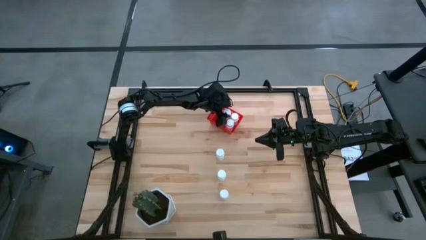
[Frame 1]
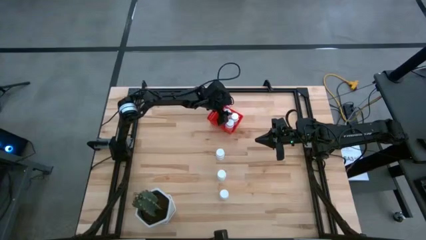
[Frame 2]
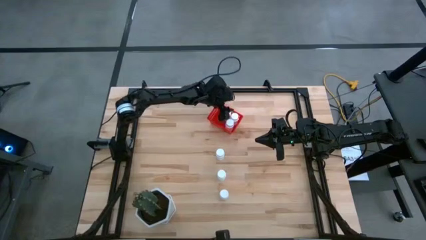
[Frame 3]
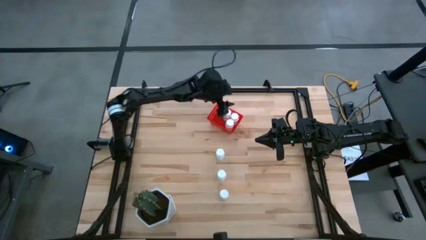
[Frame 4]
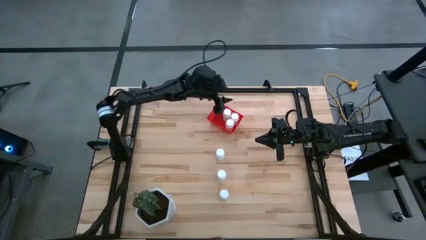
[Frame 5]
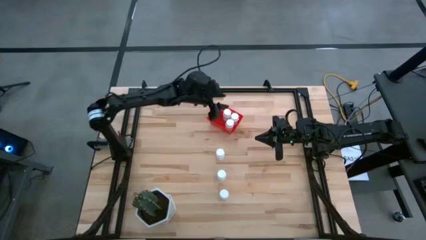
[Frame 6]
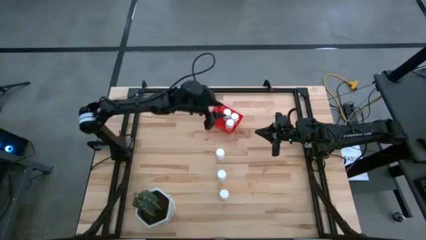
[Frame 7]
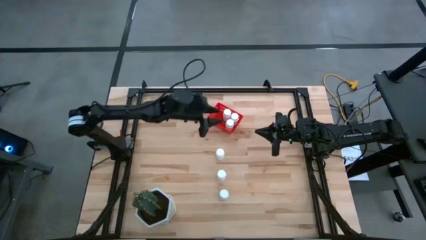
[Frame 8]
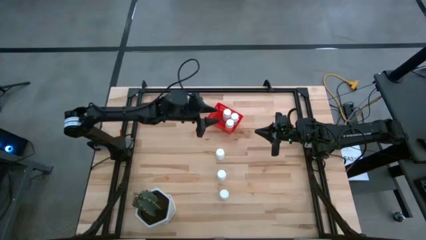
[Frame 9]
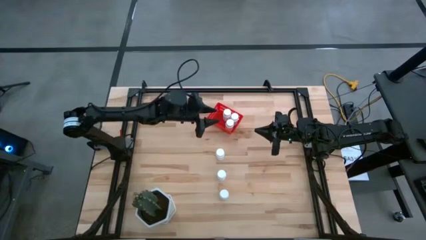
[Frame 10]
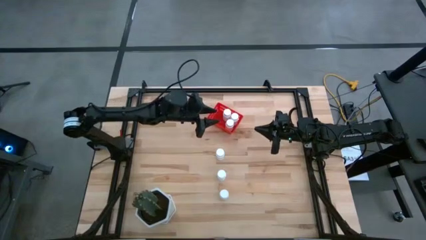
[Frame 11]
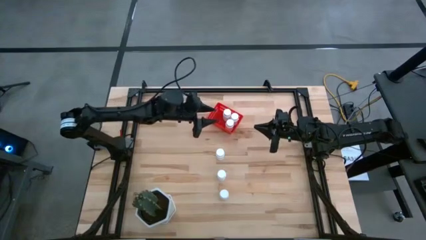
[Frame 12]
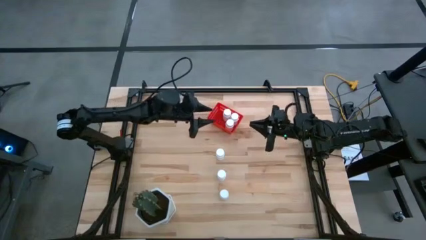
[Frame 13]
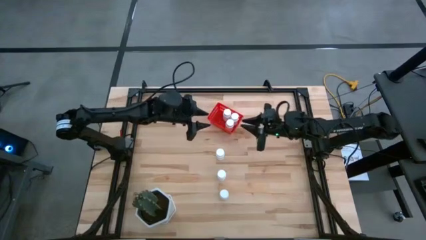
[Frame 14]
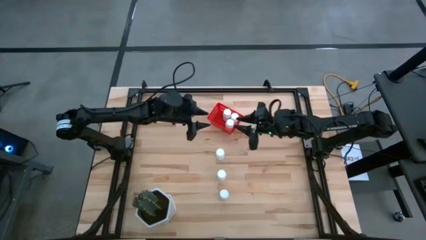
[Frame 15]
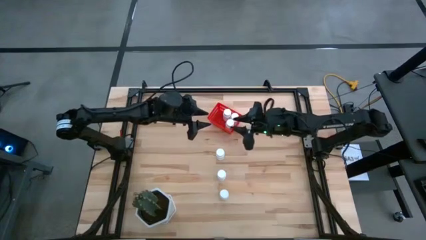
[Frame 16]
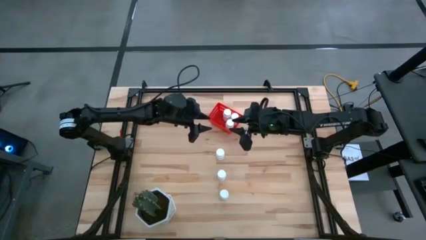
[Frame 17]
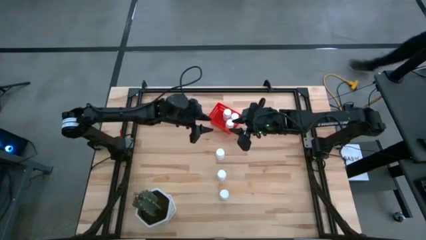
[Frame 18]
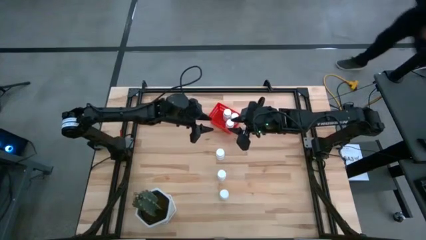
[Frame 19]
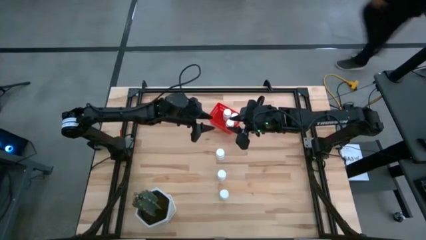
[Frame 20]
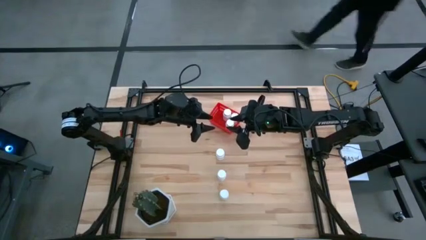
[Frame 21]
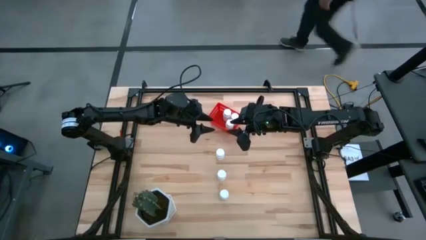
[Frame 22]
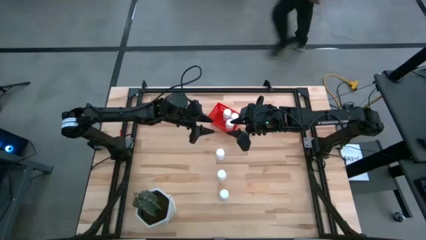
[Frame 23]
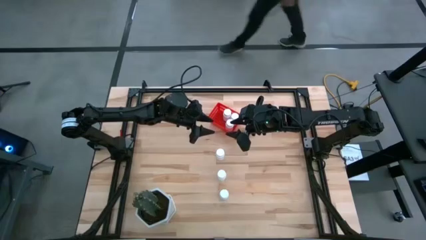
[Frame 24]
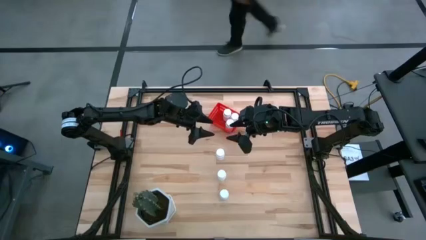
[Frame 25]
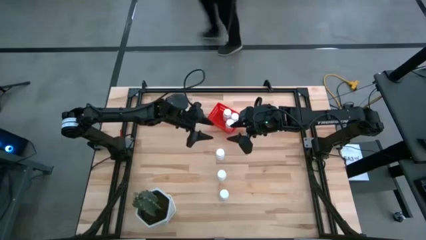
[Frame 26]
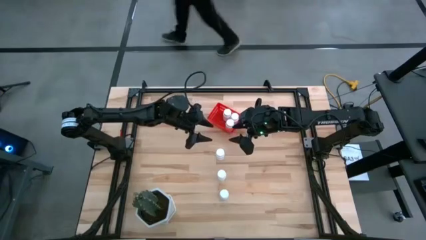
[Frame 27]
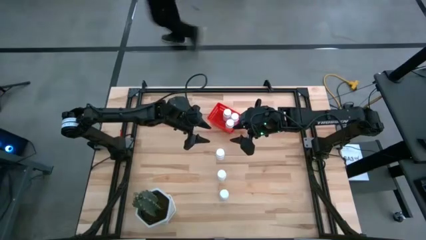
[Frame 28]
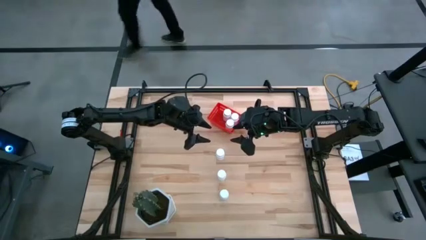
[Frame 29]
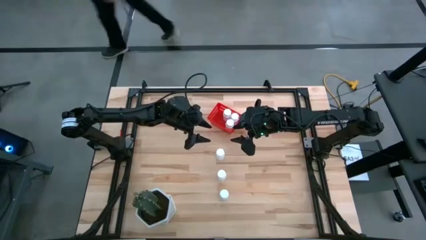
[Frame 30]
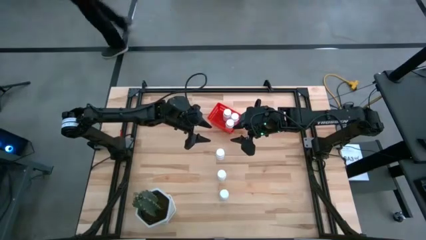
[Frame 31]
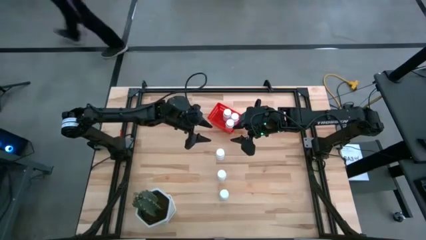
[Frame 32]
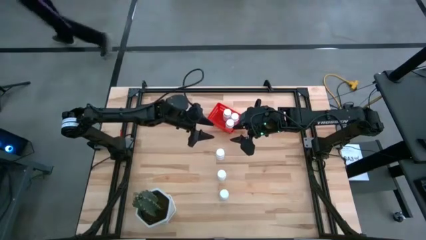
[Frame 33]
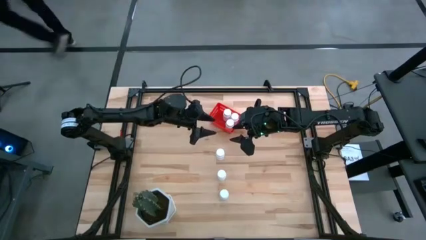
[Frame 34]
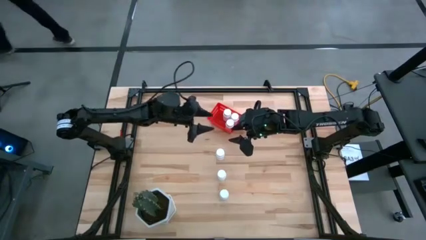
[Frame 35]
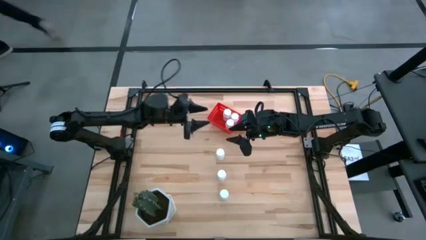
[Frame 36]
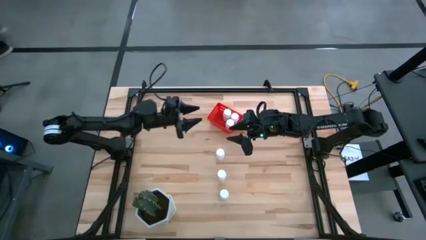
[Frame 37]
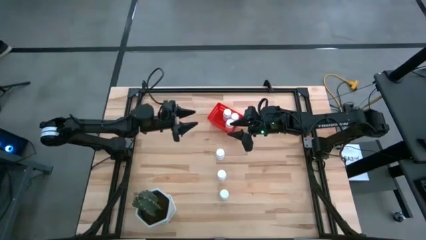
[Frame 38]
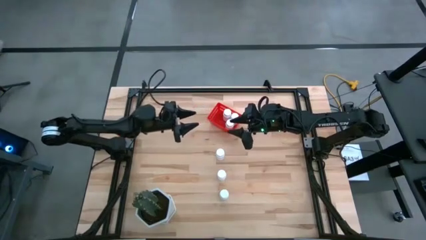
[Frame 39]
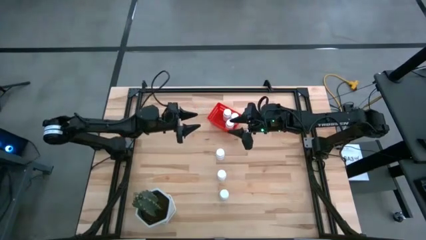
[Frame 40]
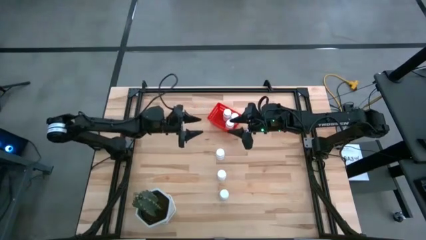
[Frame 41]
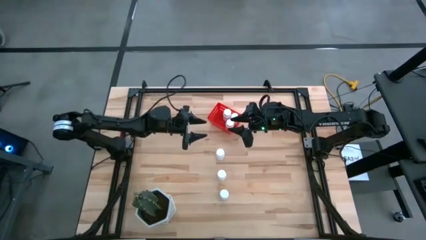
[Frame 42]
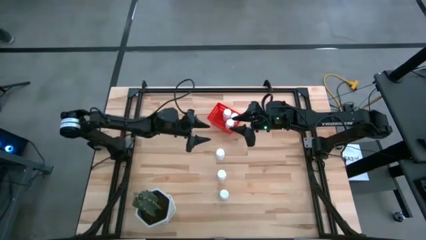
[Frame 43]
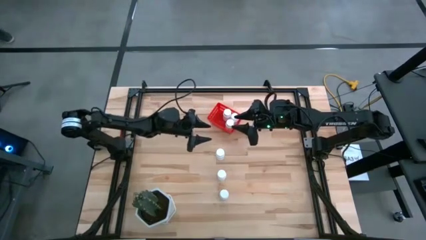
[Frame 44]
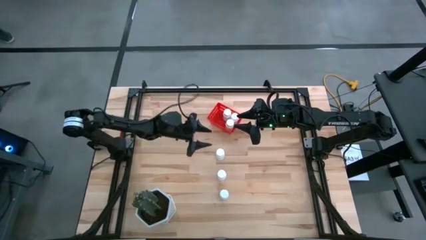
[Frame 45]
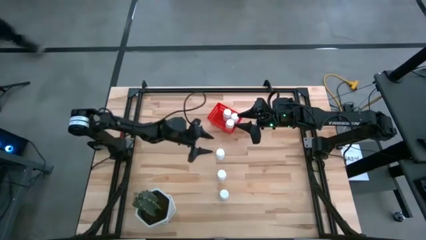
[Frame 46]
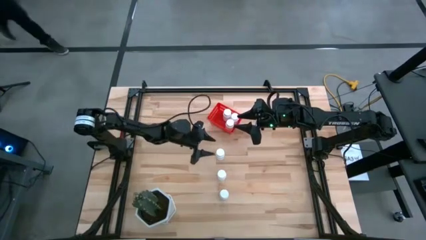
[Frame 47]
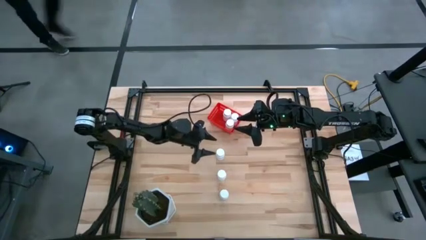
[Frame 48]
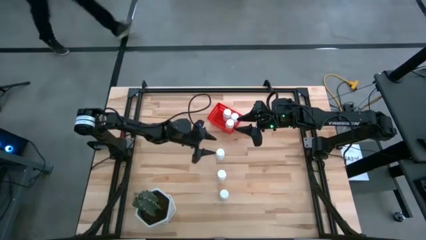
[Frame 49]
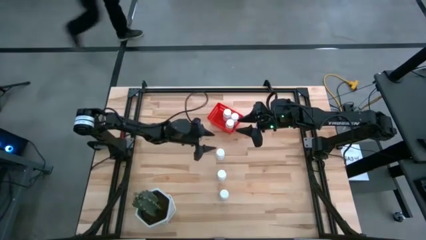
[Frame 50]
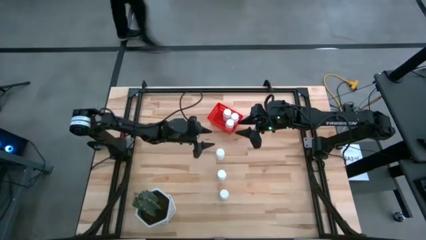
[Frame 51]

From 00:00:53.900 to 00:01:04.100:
Task: Pick and place pill bottles into a basket
Put the white pill bottle into the red bin

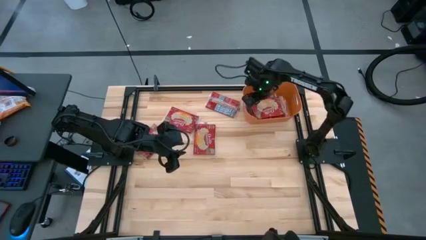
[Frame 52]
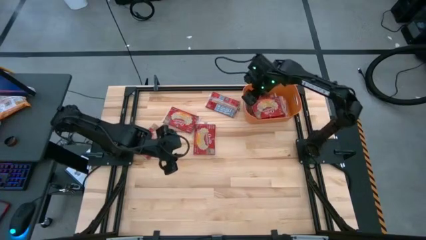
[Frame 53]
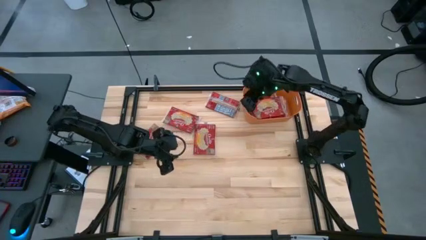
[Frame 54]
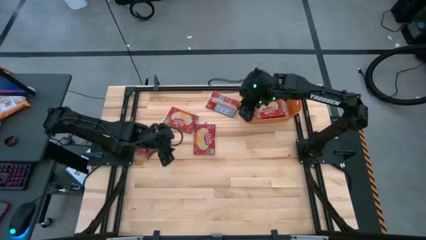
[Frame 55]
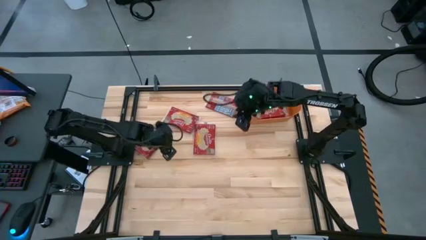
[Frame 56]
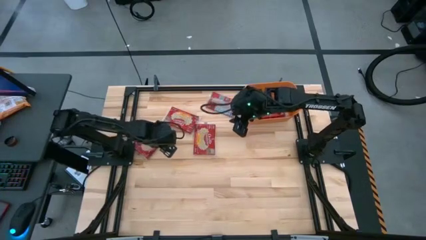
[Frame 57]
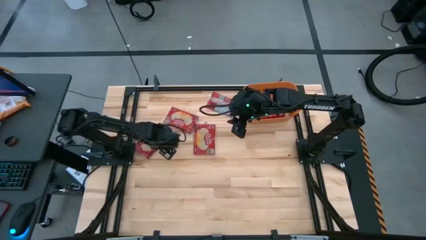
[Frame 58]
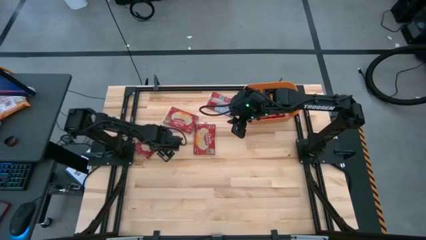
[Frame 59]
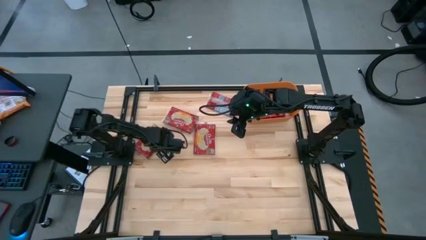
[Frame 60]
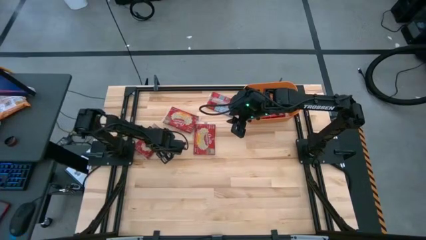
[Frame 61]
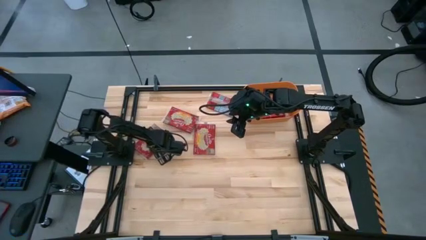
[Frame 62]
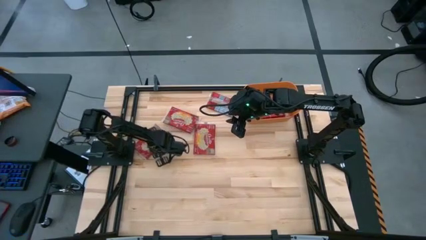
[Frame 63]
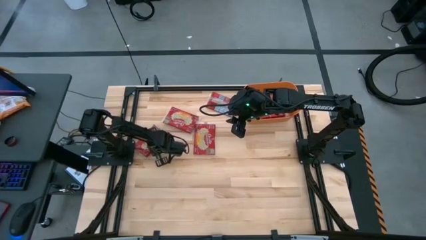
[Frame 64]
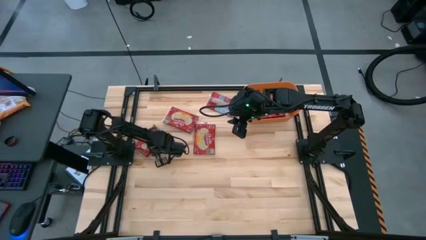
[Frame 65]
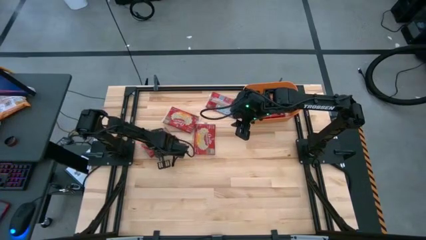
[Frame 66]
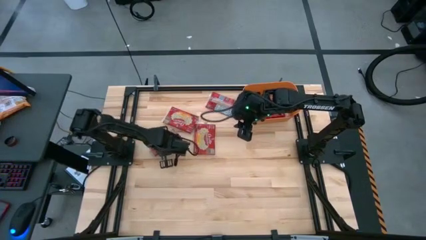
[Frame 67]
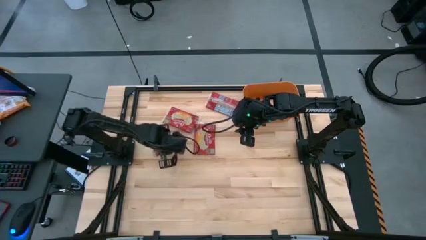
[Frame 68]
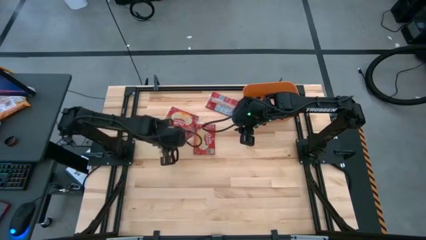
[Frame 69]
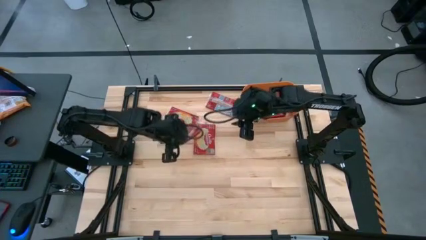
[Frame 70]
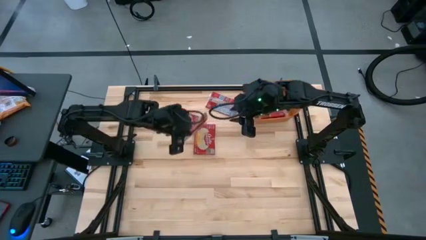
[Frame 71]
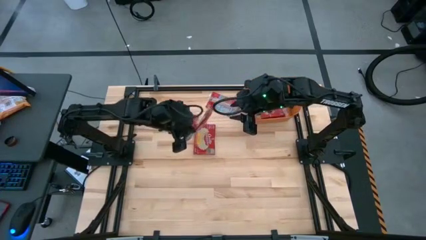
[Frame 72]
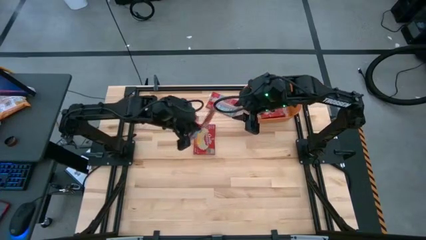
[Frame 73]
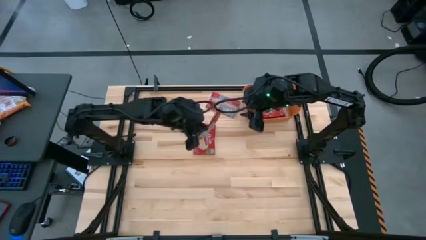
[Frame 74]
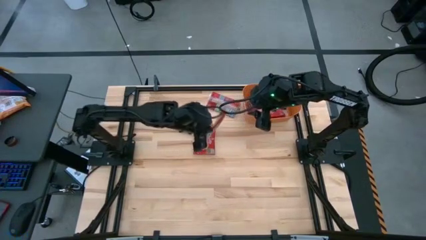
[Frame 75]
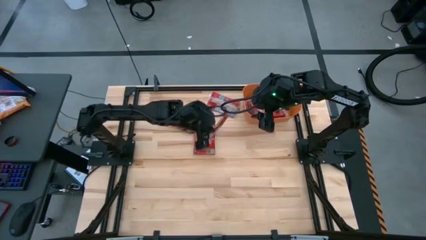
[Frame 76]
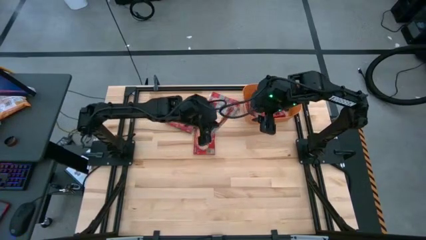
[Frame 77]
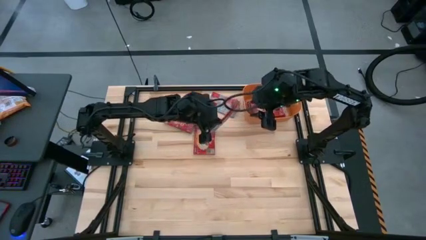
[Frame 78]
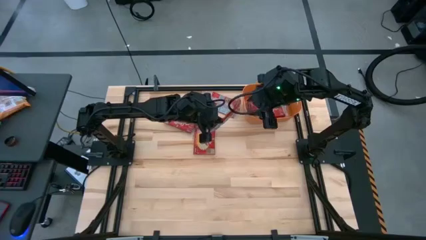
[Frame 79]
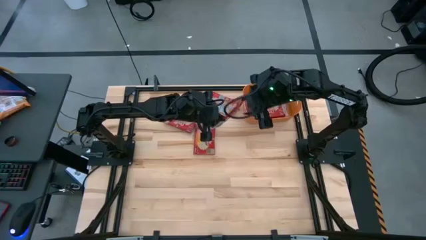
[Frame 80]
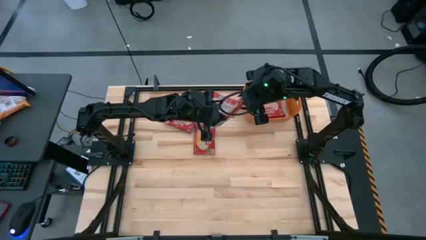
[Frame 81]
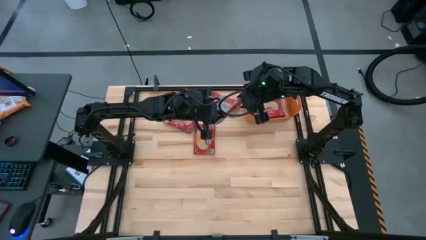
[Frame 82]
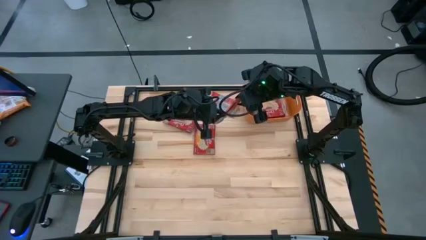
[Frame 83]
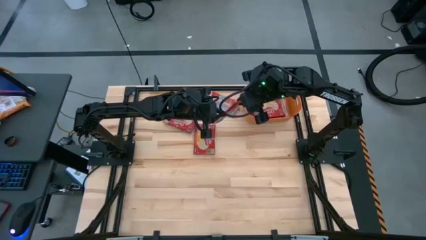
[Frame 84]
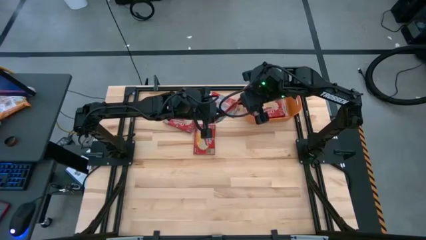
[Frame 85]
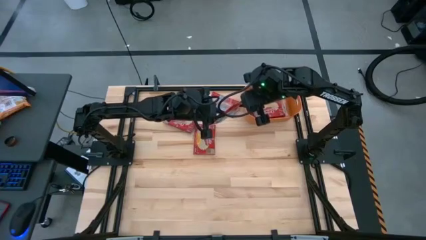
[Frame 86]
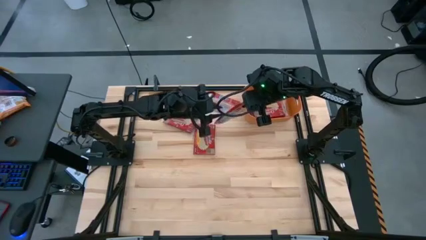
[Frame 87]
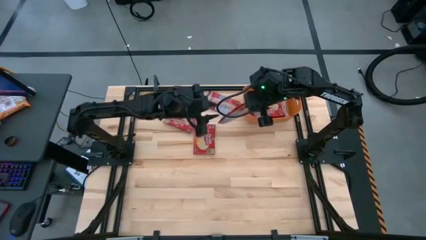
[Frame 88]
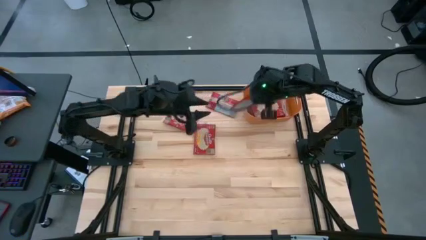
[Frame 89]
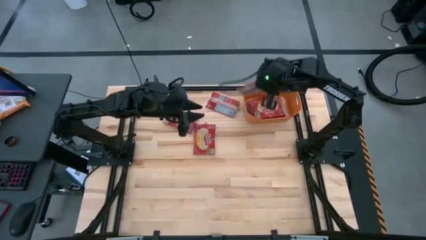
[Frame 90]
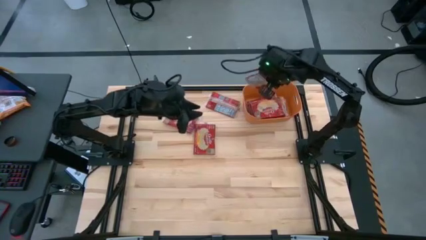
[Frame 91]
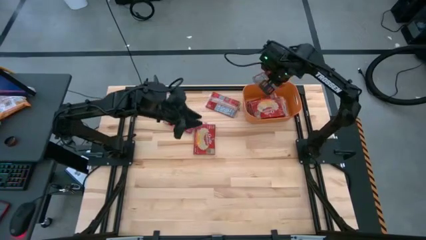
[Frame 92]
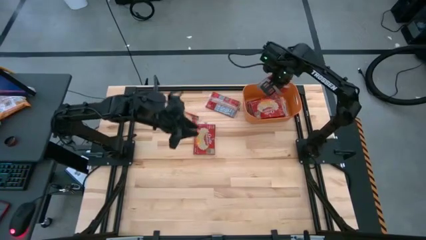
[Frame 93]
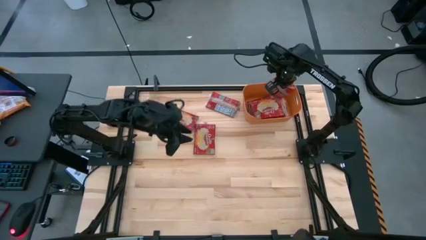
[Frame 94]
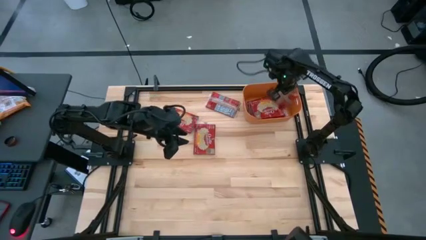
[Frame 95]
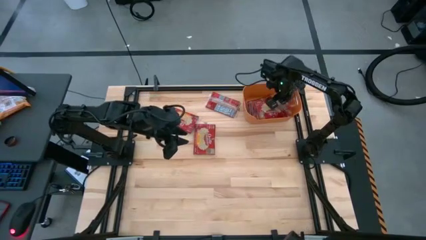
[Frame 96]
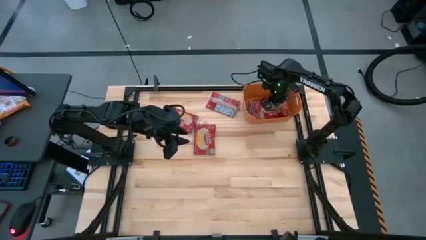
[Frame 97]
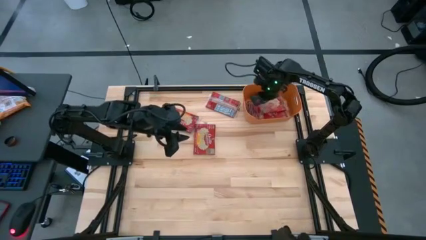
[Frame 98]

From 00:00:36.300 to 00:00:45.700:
Task: Sort popcorn bags into baskets
Put the red popcorn bag into the orange bin
